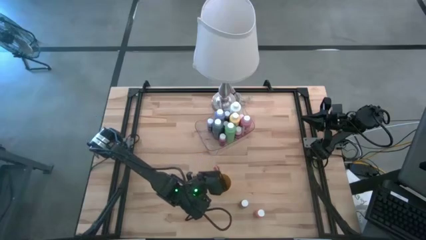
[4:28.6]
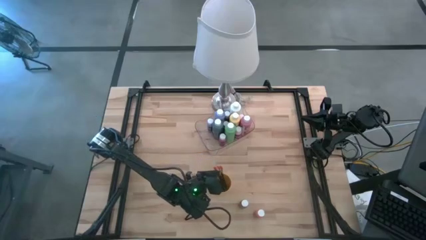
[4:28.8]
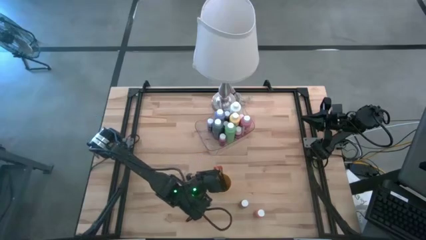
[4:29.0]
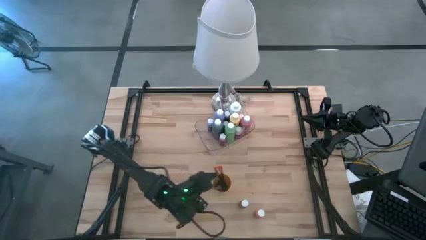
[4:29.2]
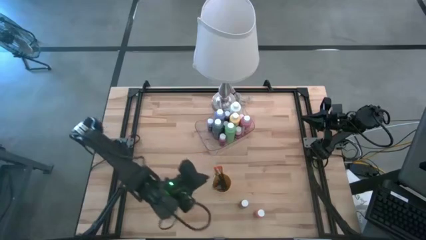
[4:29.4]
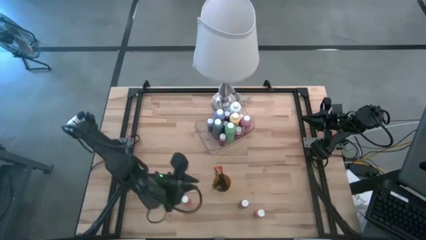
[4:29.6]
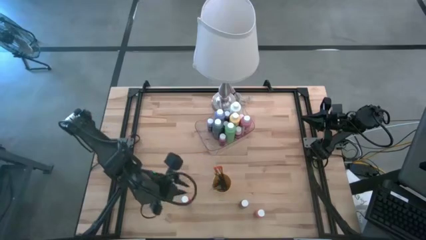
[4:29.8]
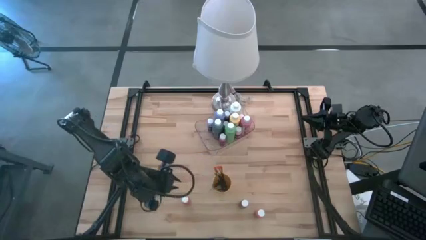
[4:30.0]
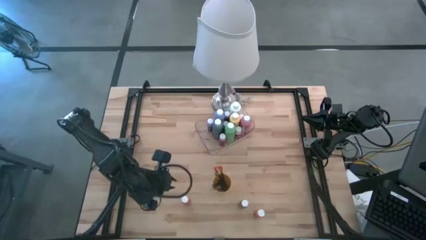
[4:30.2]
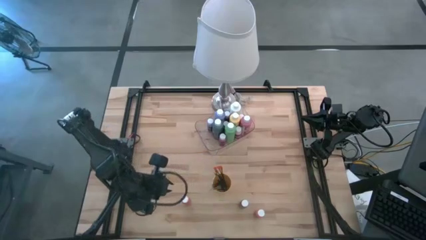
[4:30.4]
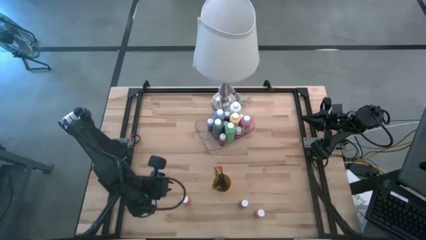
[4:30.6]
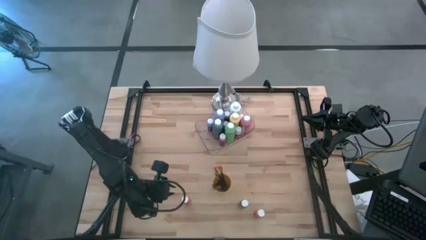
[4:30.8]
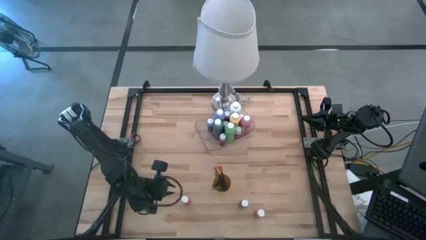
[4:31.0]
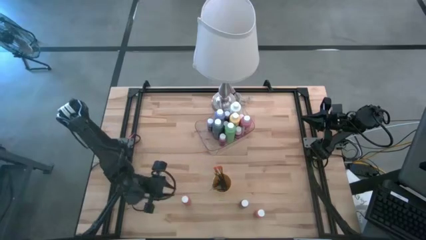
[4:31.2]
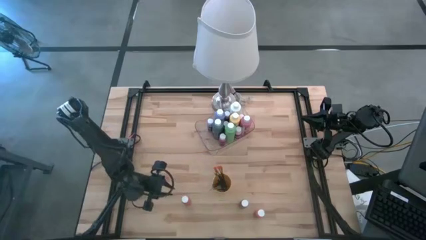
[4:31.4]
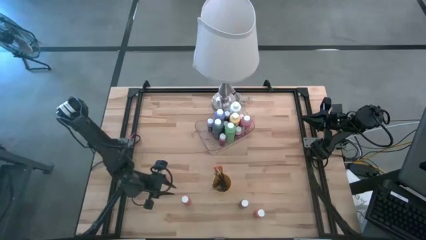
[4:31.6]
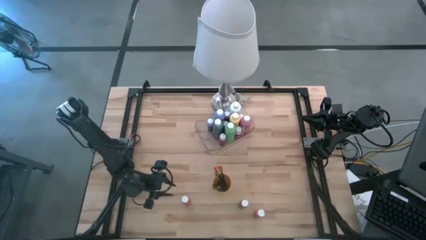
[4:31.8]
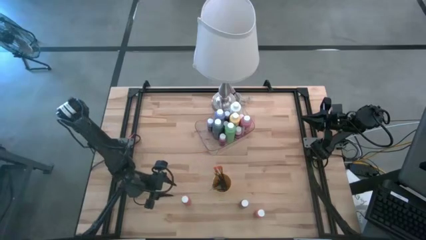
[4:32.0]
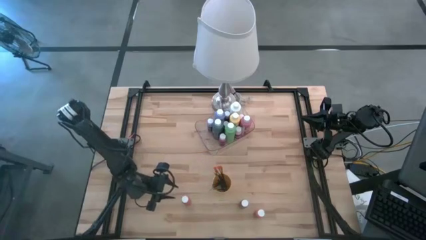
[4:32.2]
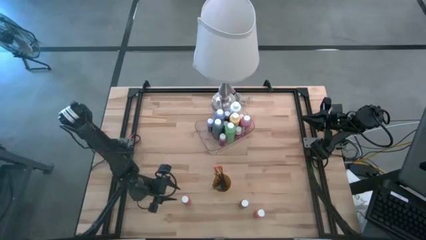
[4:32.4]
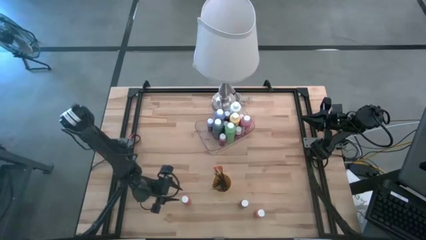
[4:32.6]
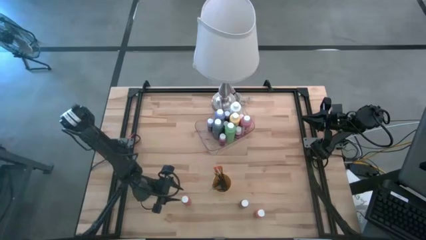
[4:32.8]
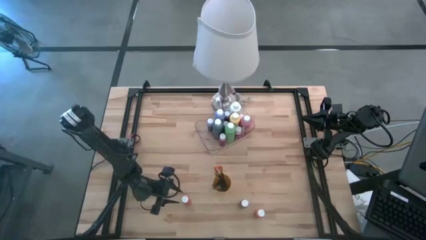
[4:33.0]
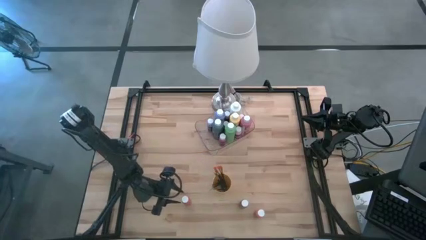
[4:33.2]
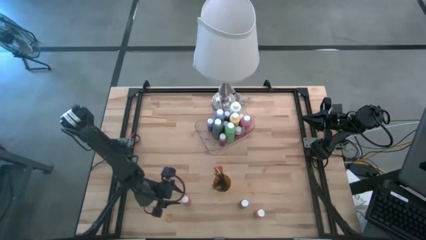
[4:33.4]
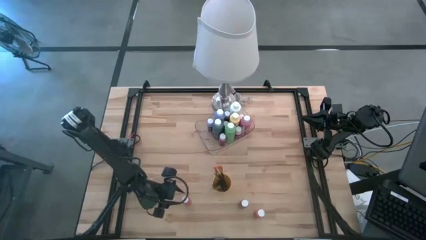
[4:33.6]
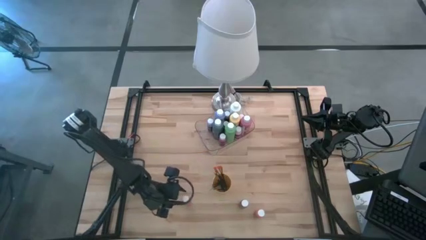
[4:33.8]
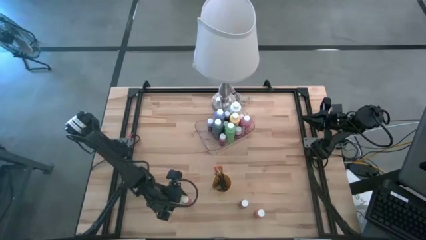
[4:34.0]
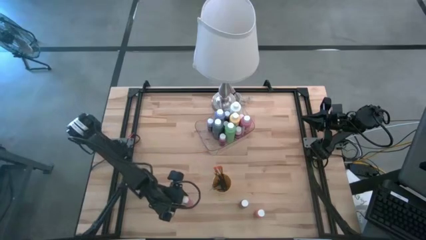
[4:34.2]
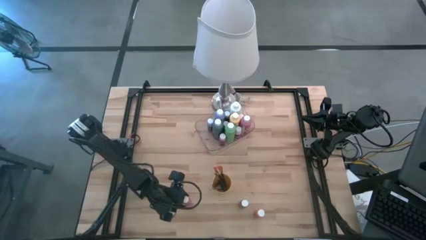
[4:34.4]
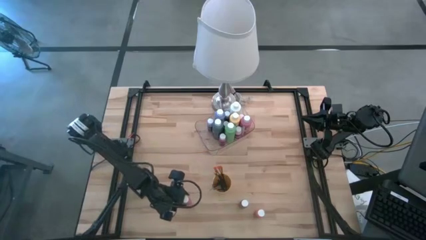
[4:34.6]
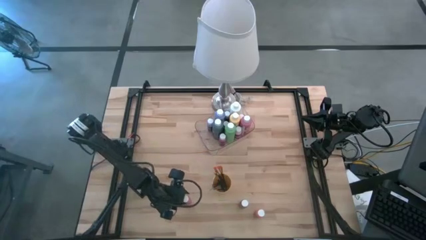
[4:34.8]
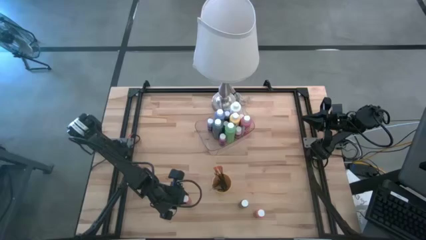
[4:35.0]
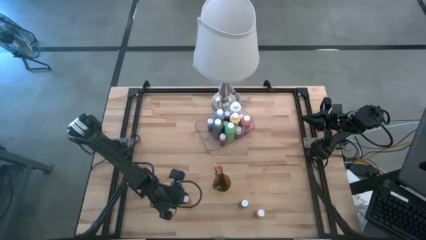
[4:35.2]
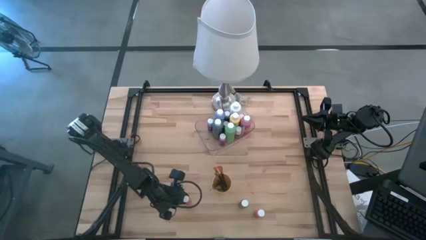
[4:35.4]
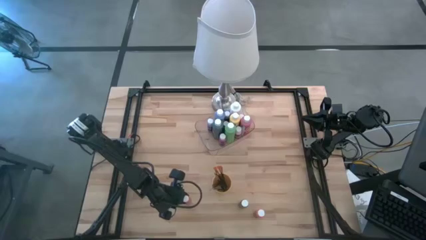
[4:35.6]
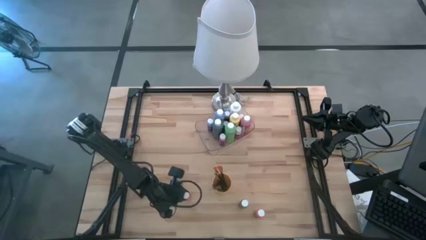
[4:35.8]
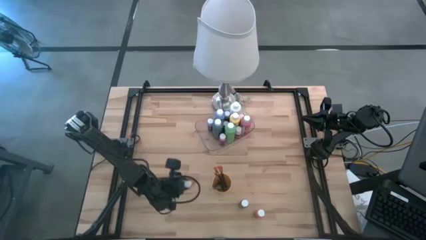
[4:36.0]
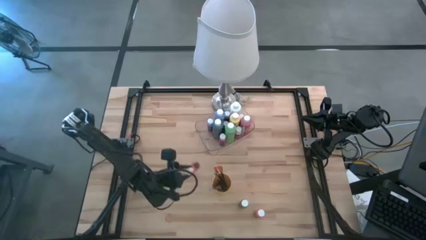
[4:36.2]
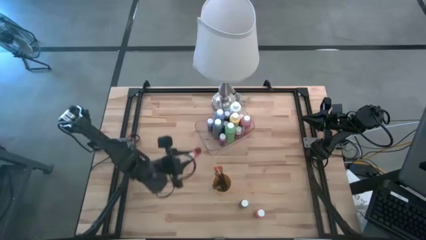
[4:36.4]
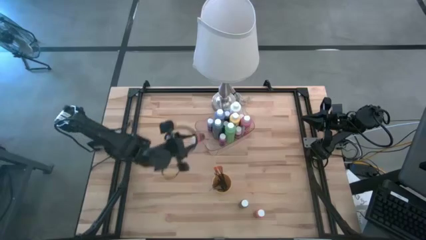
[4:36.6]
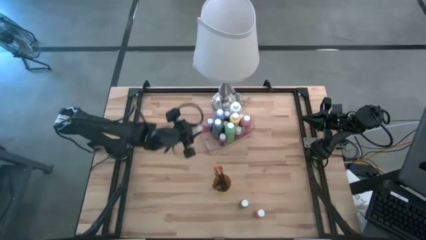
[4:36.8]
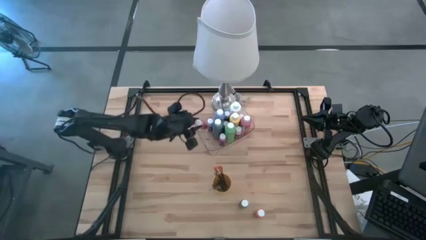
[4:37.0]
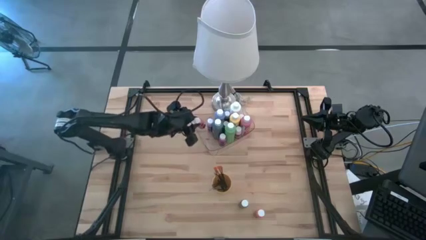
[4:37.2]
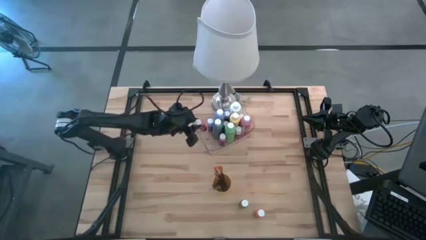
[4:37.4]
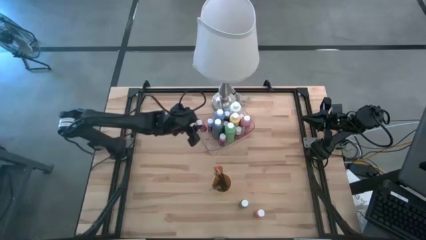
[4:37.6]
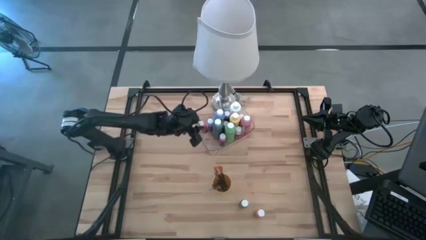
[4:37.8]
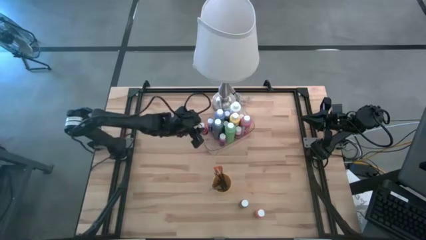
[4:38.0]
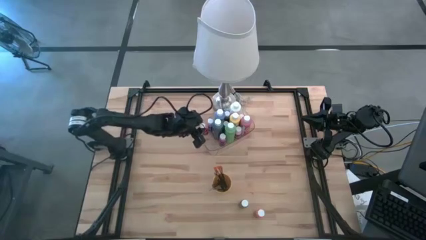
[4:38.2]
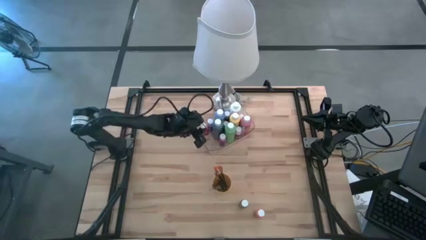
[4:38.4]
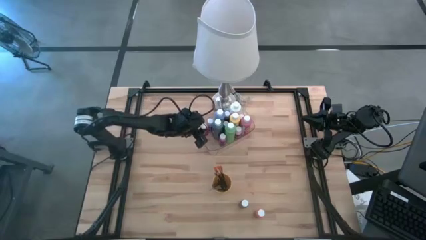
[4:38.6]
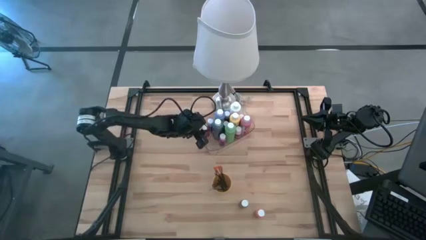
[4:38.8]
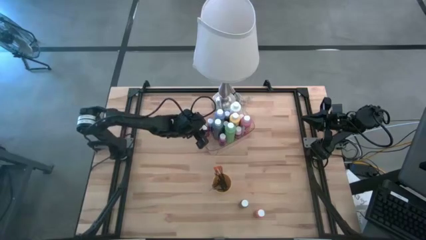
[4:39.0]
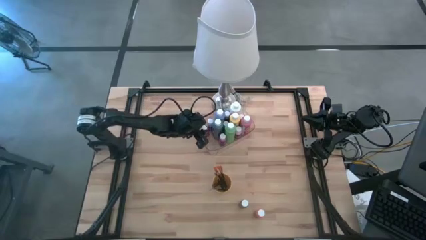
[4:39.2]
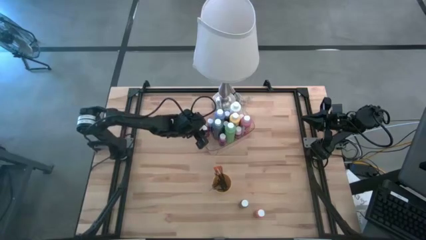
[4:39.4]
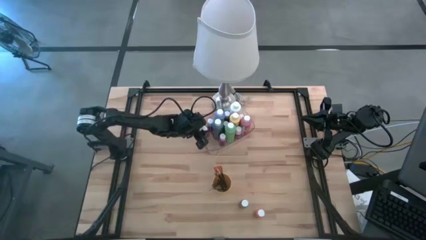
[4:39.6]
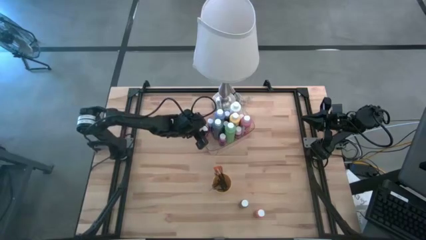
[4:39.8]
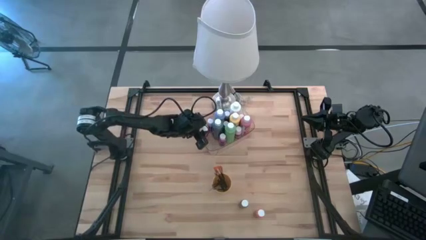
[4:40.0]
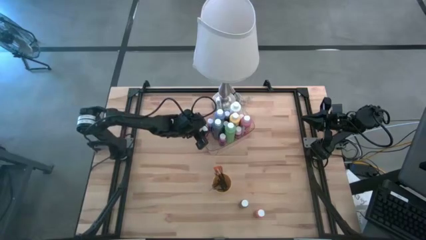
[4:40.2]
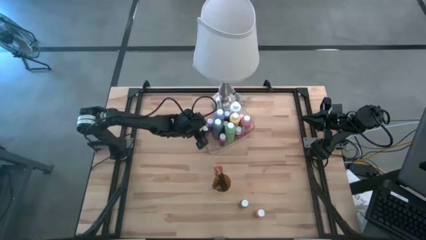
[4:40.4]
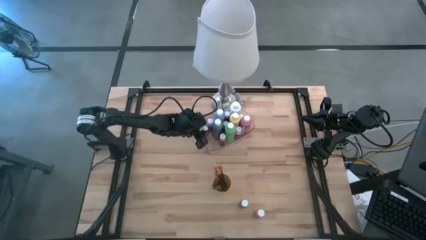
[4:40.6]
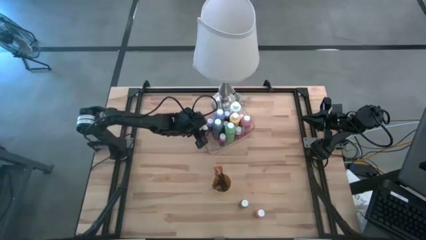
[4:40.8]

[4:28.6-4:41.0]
Task: Pick & Place Paint Supplies
Put the left orange bottle into the transparent bin
